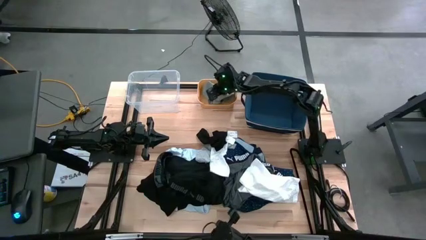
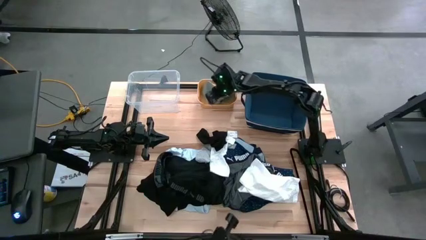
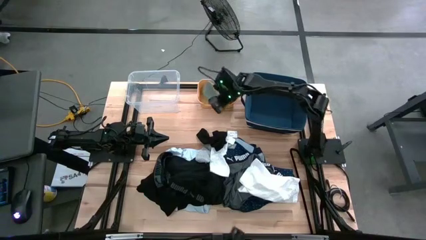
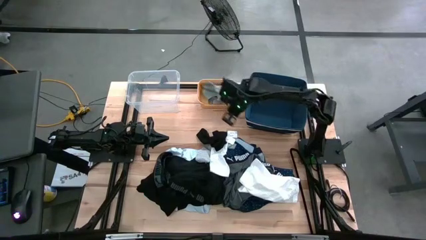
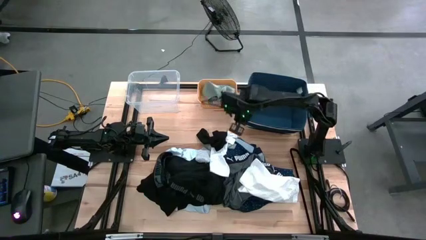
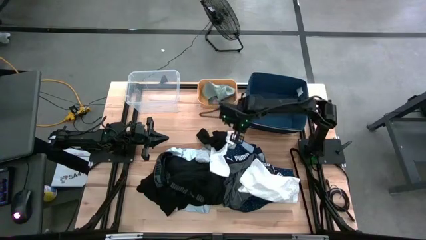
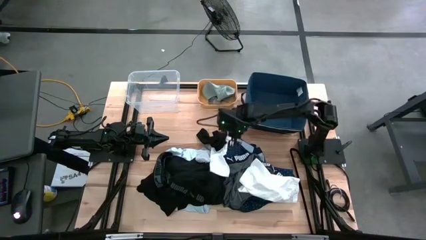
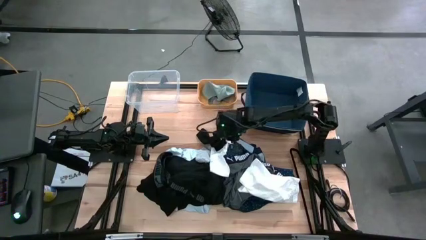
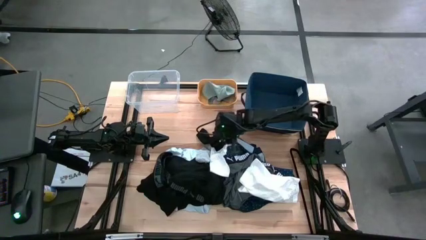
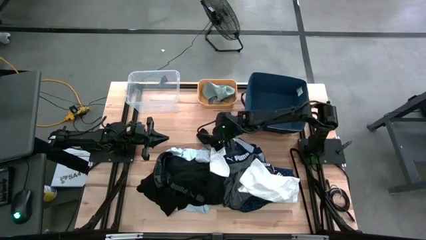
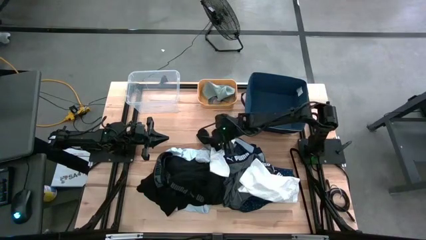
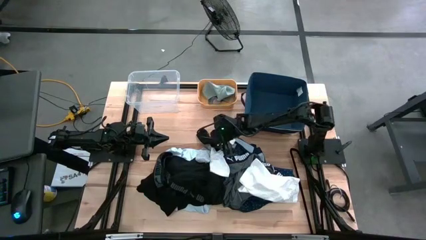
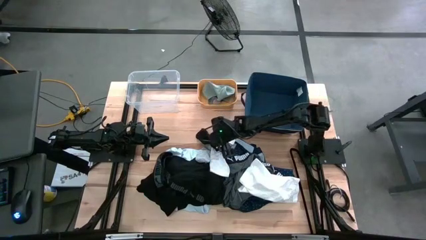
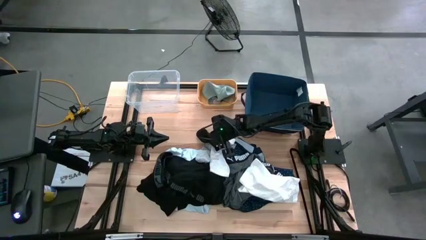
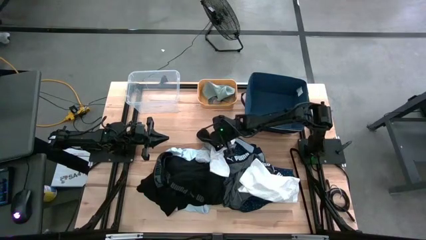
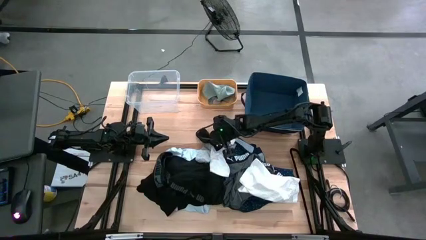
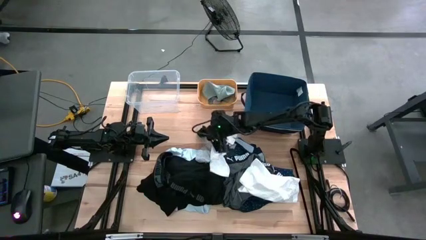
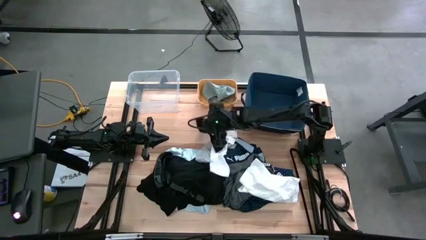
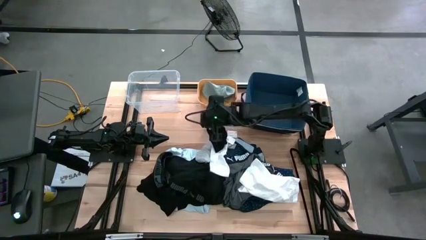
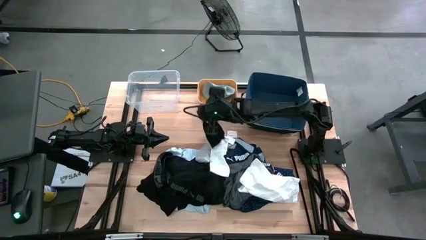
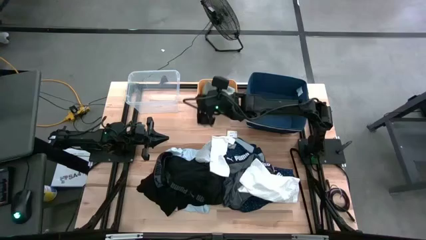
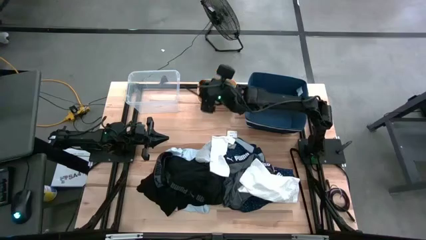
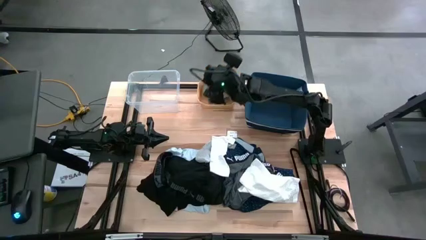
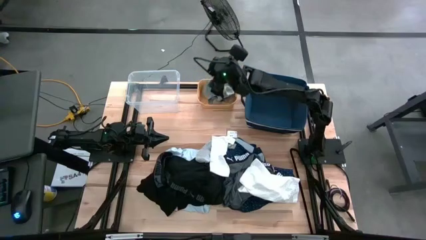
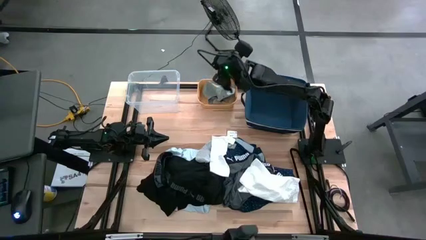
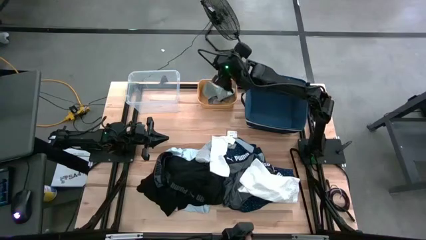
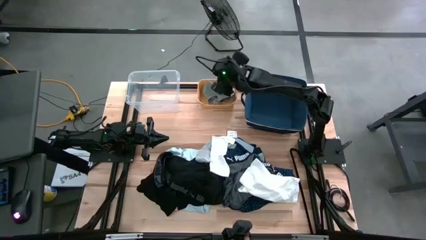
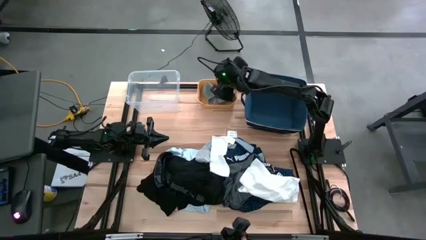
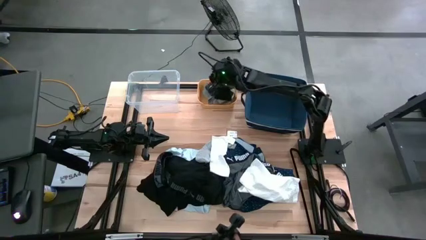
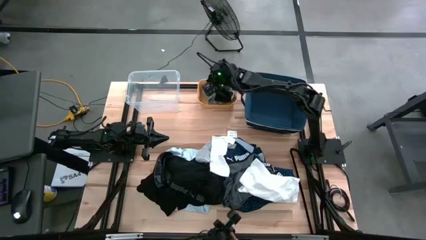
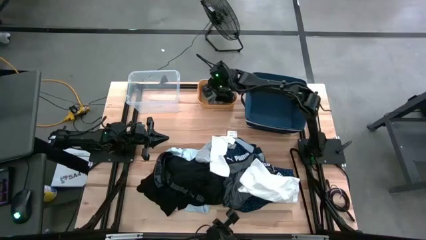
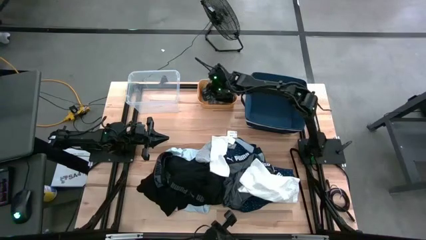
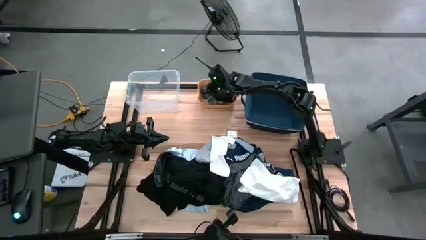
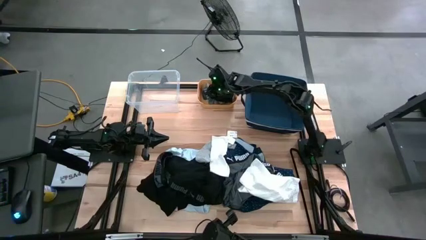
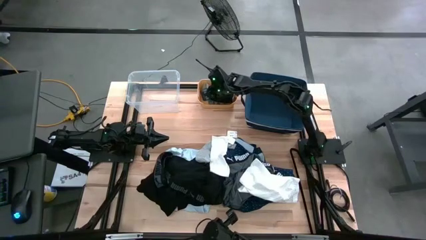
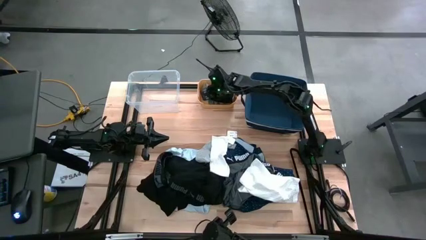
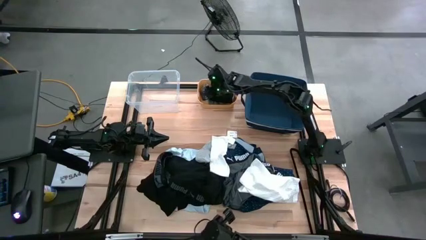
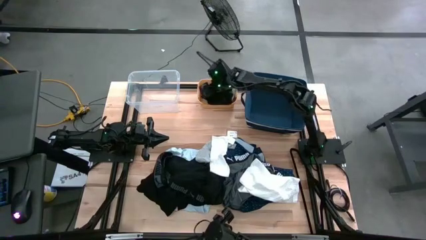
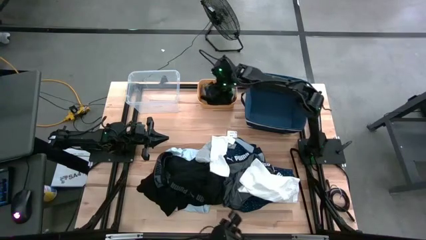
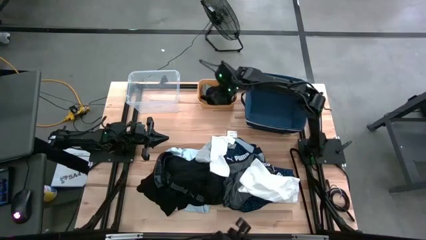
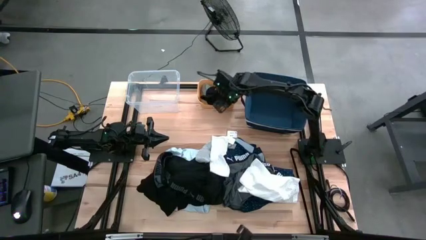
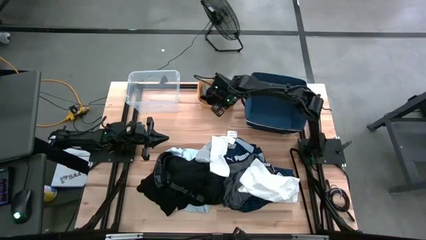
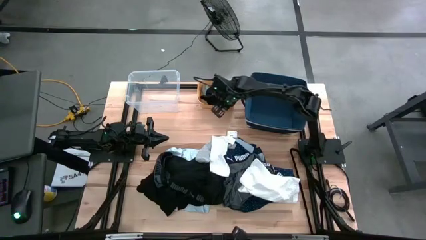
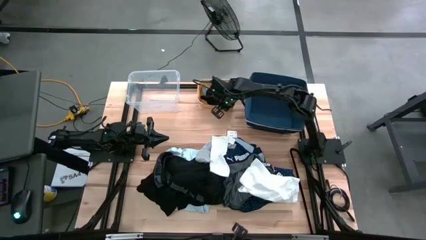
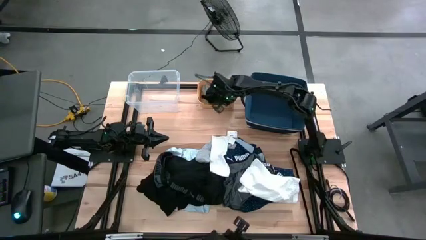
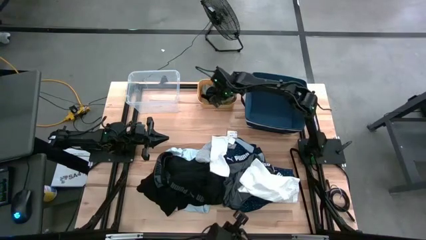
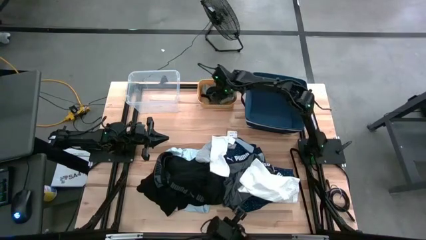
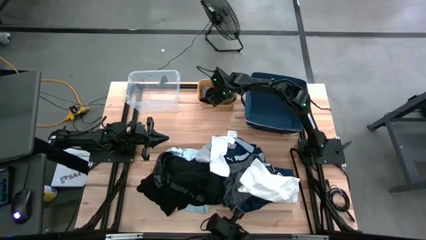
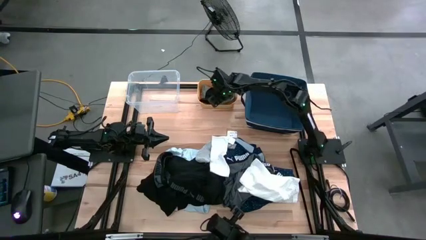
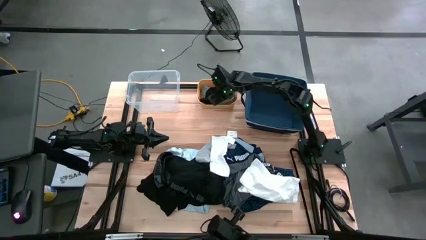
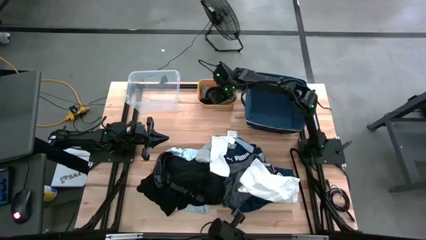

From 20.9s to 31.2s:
Task: Pick & Place Cloths
Put the black sock into the yellow bin

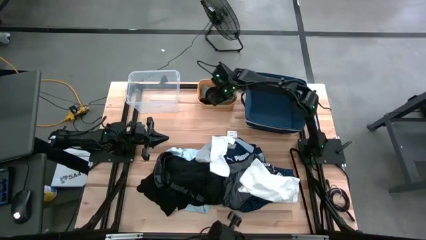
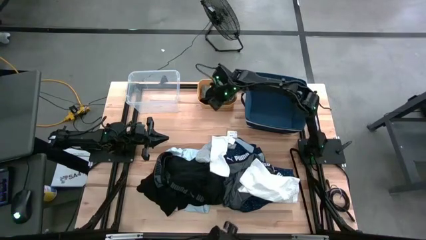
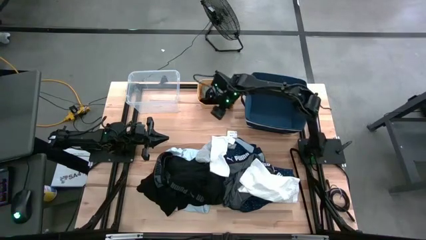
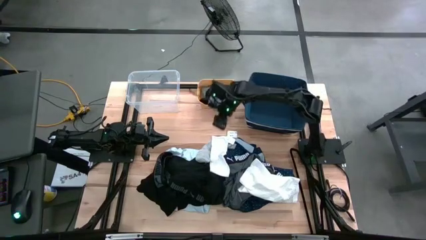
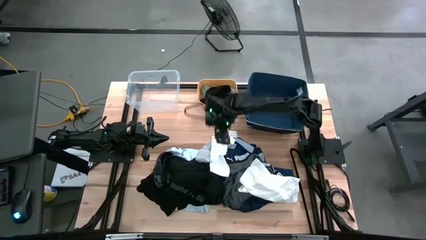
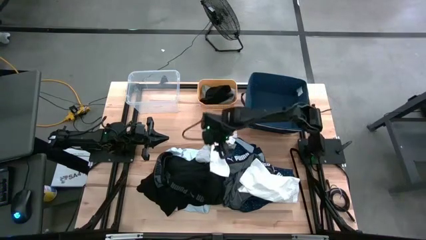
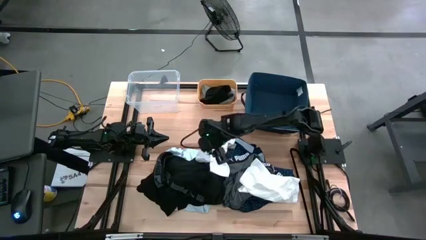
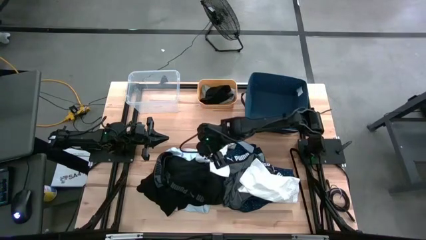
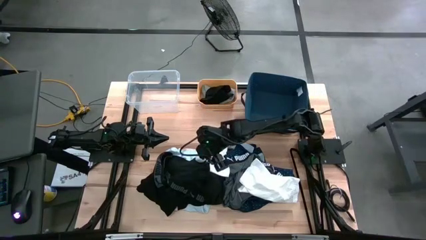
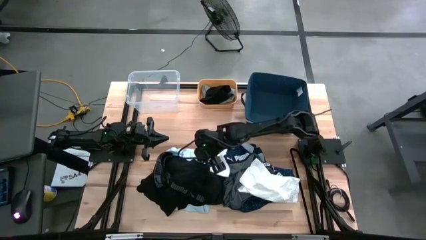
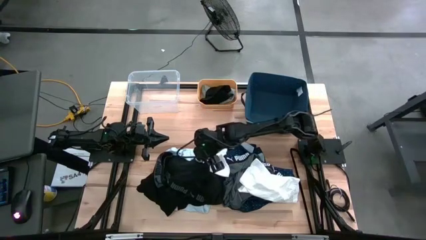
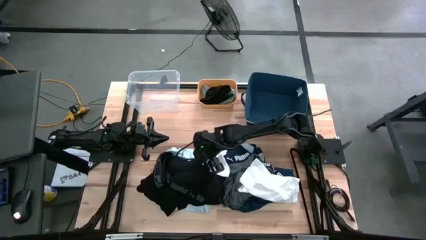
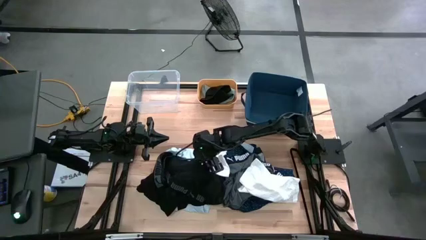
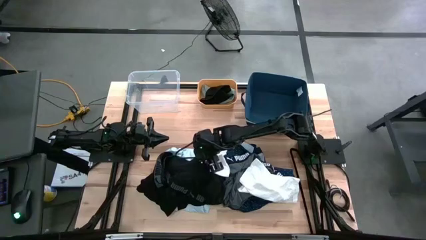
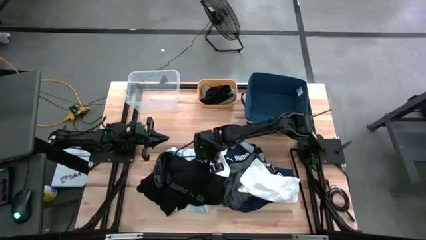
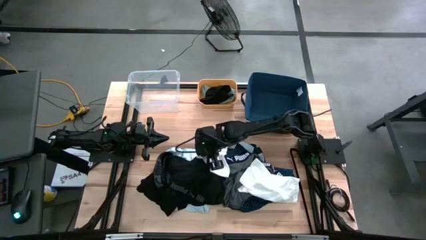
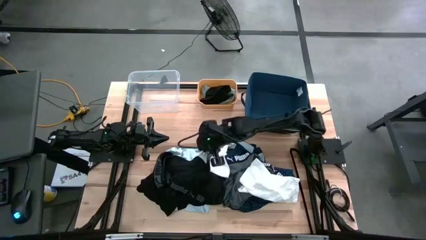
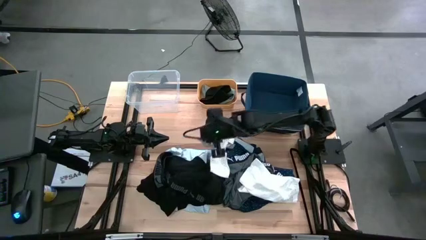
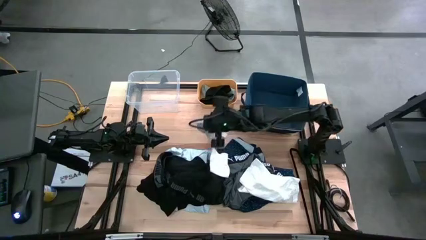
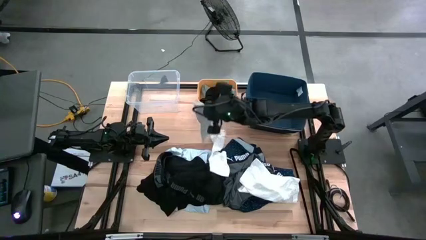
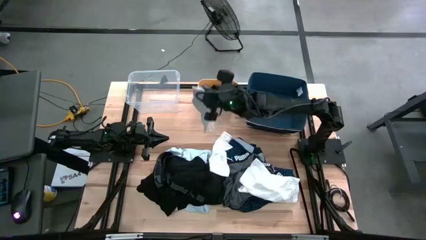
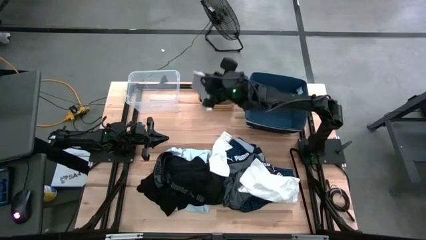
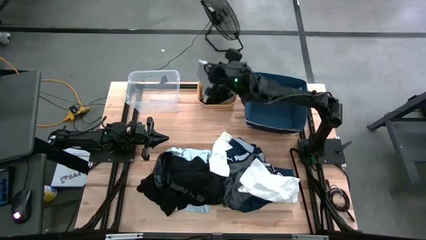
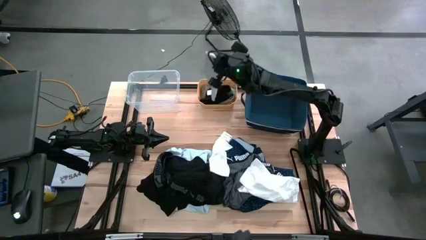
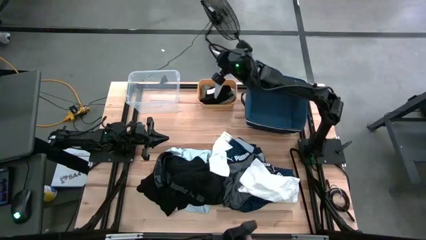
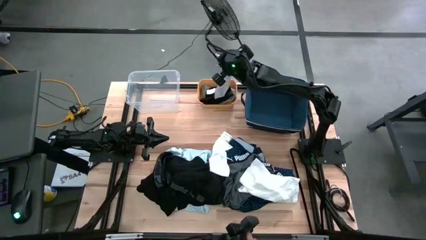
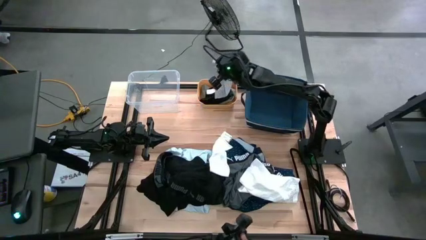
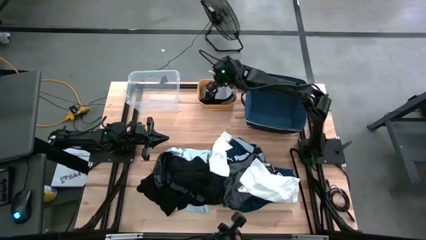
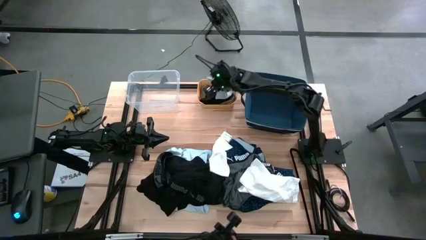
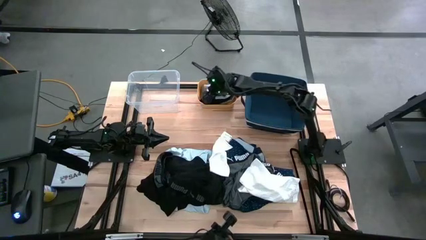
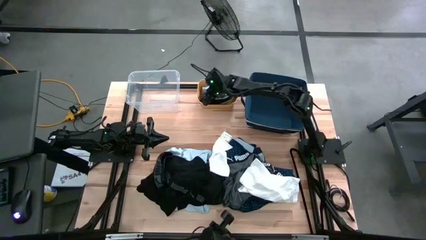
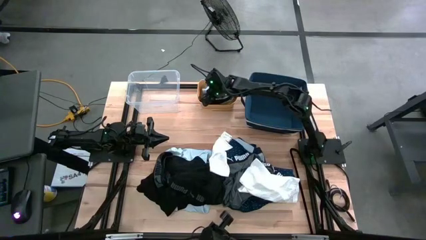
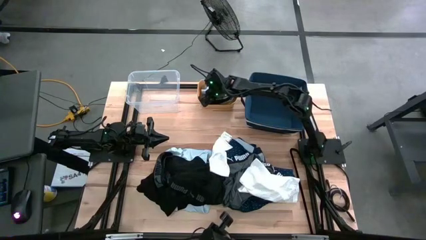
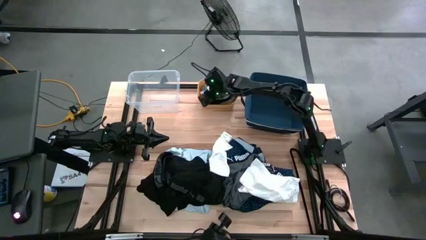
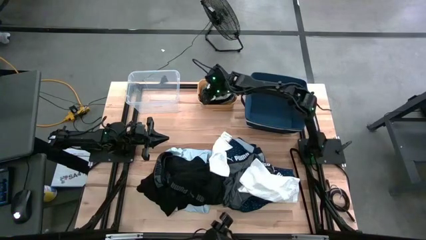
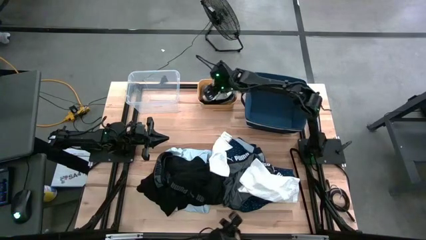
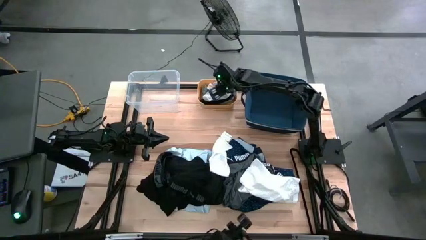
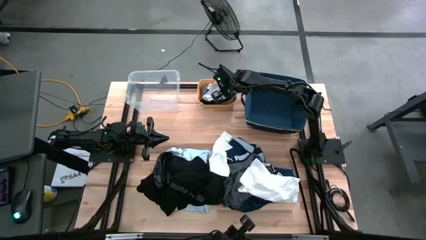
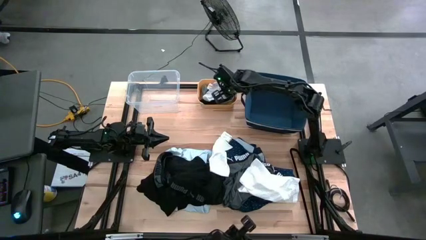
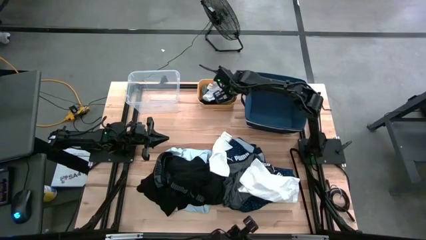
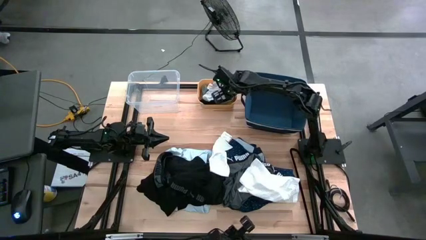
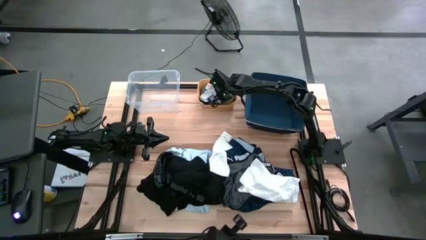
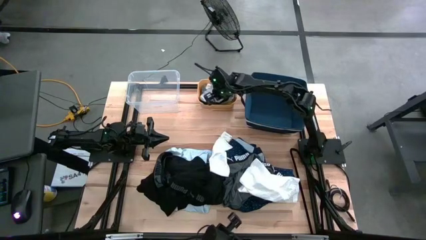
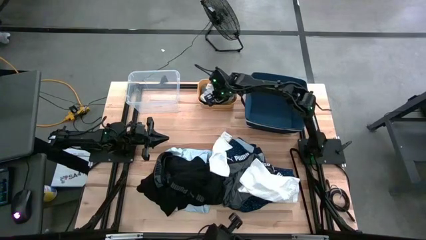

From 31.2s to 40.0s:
Put the gray sock into the yellow bin
